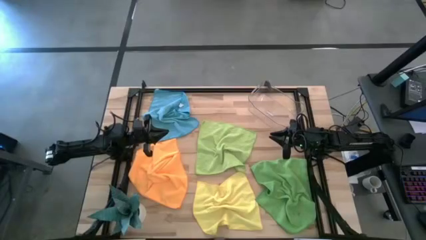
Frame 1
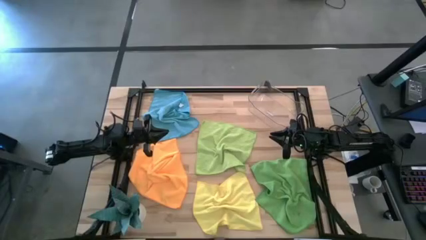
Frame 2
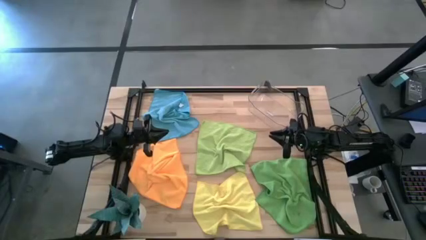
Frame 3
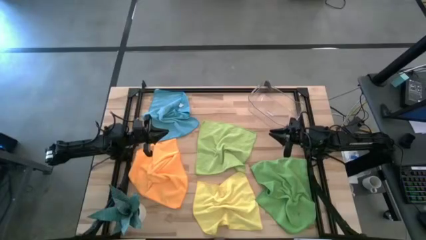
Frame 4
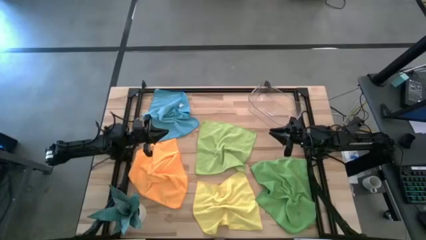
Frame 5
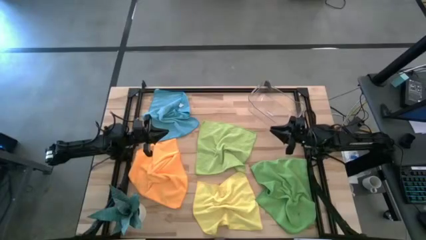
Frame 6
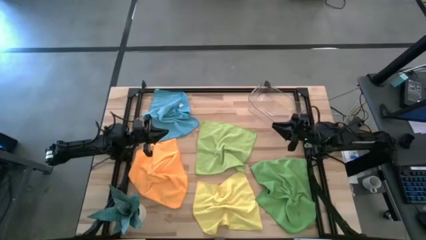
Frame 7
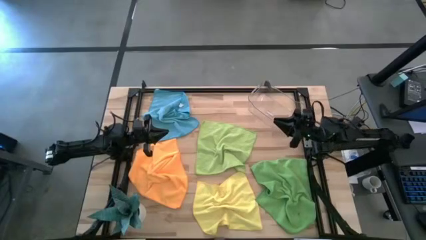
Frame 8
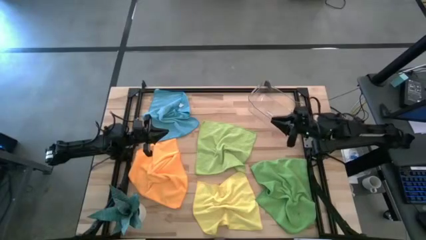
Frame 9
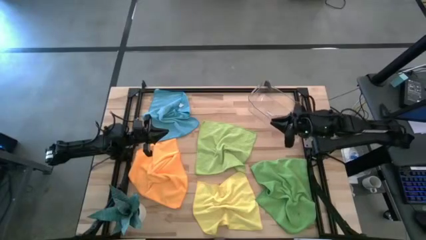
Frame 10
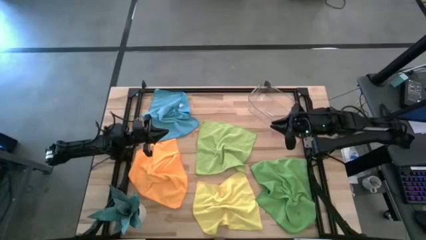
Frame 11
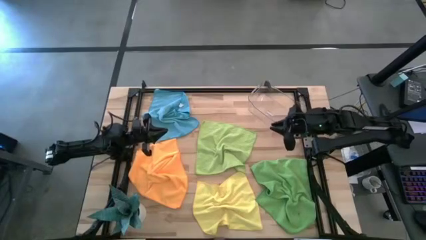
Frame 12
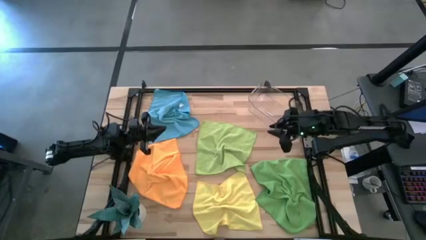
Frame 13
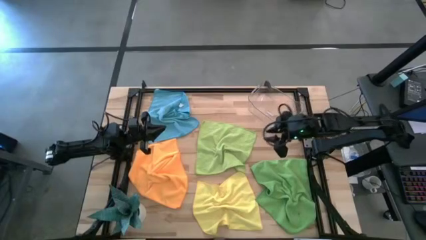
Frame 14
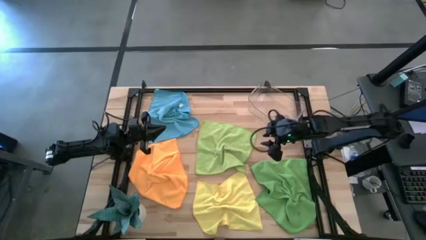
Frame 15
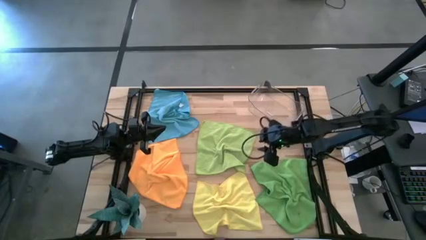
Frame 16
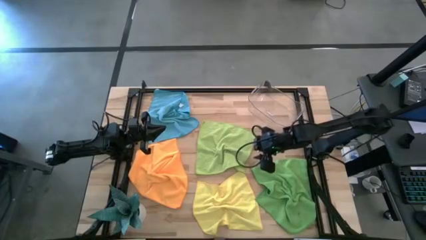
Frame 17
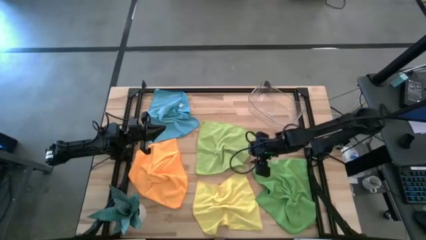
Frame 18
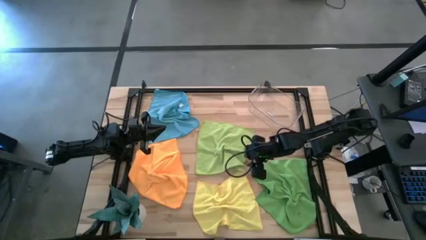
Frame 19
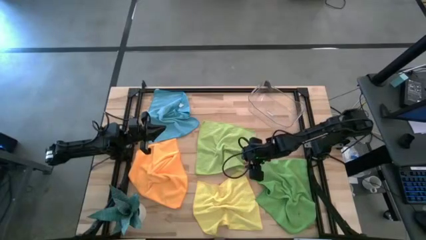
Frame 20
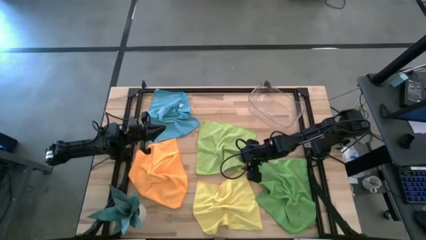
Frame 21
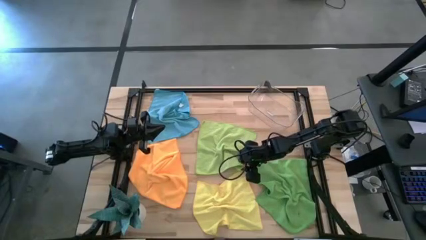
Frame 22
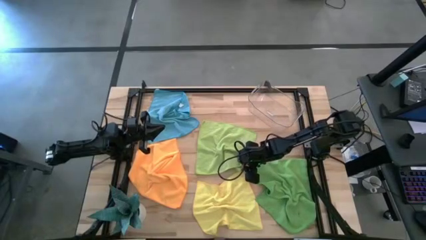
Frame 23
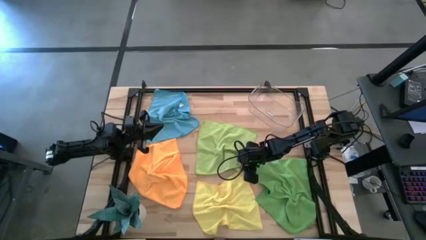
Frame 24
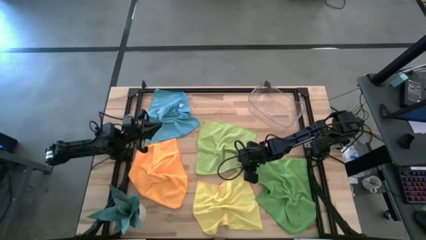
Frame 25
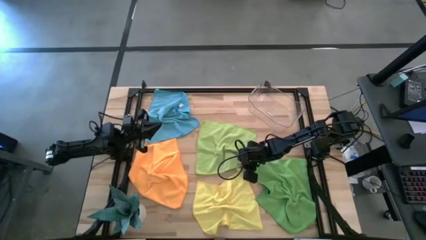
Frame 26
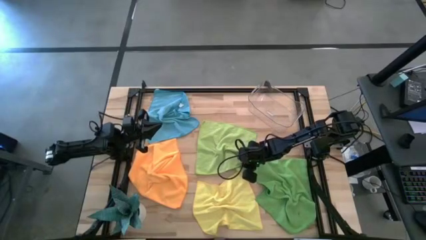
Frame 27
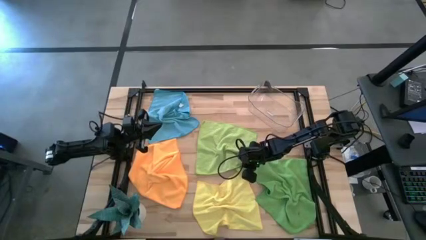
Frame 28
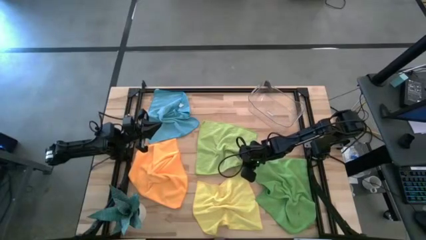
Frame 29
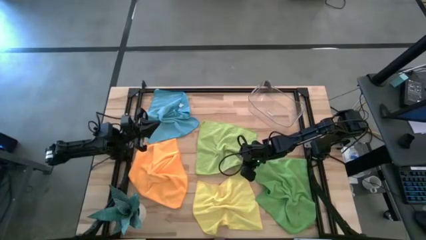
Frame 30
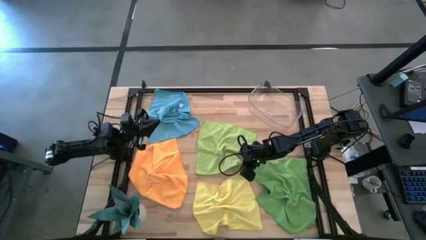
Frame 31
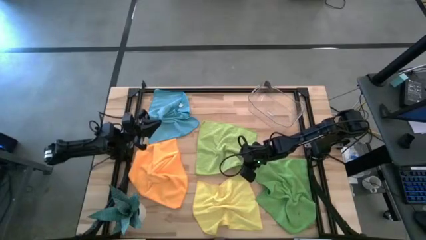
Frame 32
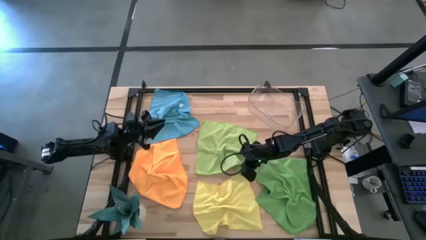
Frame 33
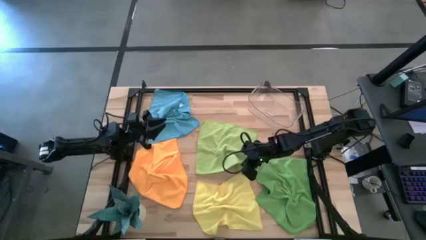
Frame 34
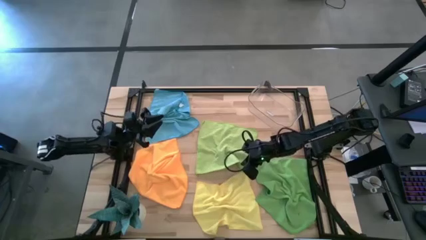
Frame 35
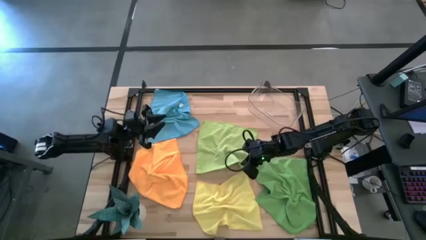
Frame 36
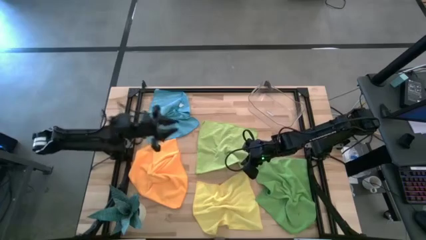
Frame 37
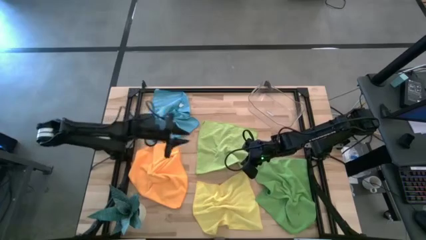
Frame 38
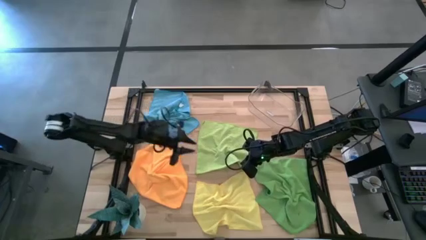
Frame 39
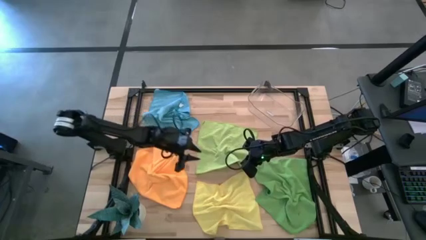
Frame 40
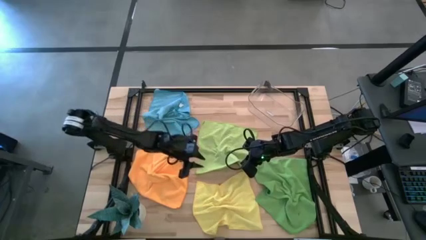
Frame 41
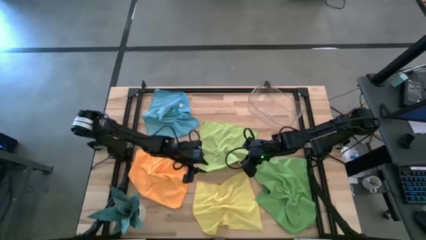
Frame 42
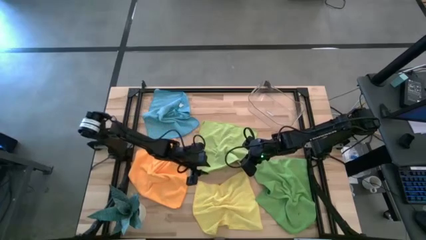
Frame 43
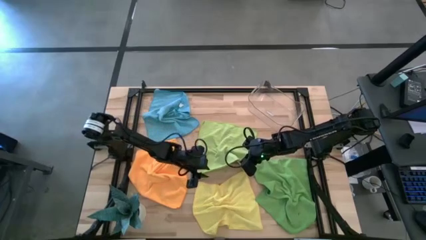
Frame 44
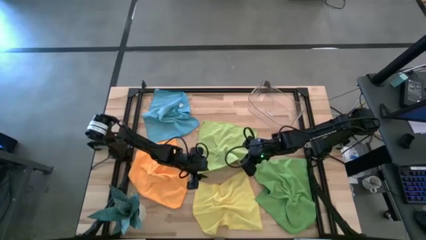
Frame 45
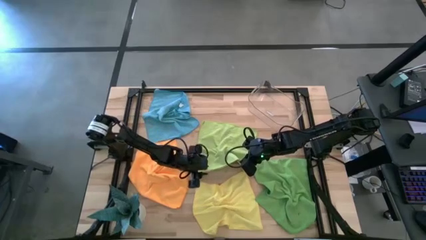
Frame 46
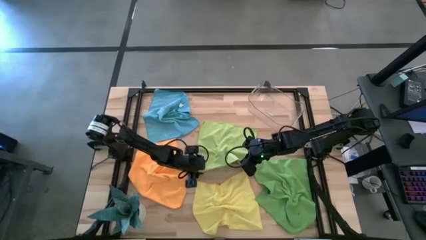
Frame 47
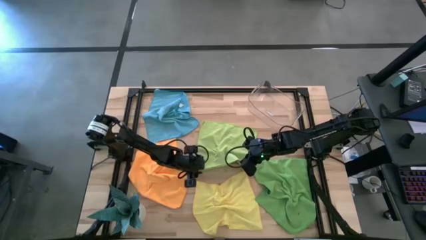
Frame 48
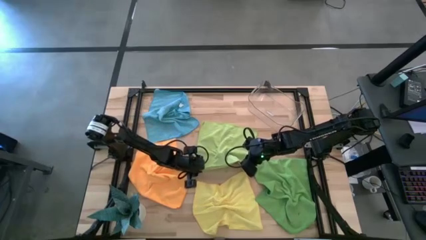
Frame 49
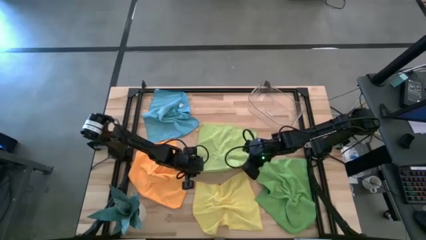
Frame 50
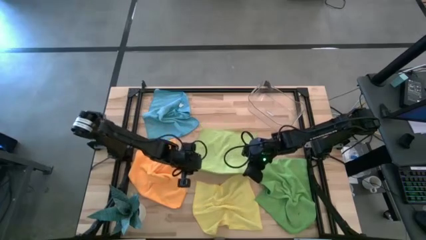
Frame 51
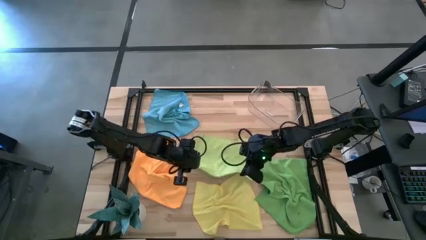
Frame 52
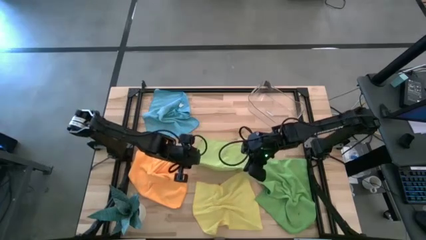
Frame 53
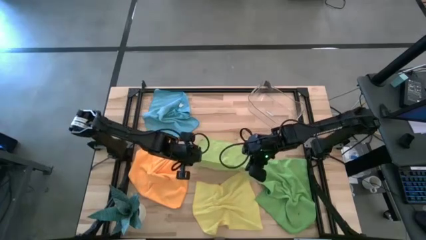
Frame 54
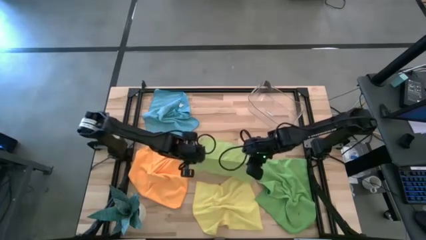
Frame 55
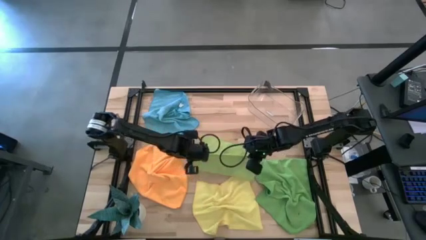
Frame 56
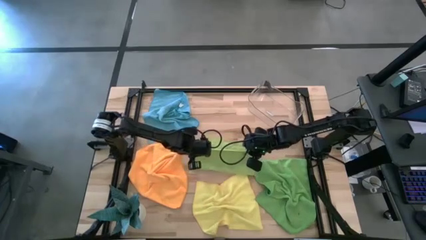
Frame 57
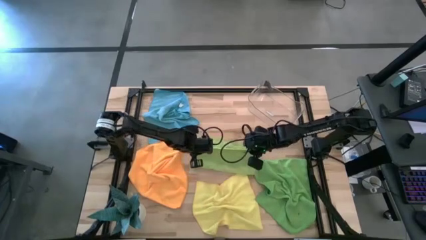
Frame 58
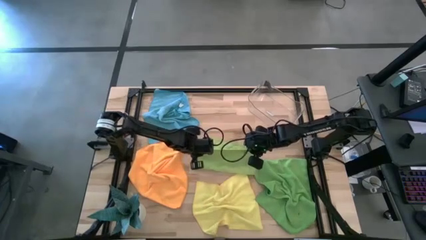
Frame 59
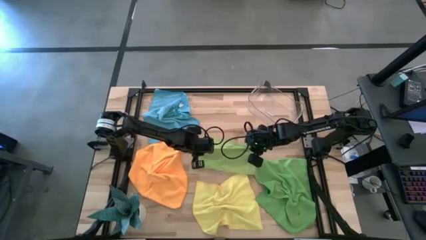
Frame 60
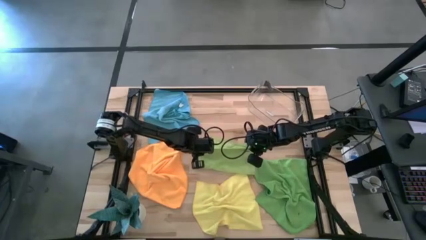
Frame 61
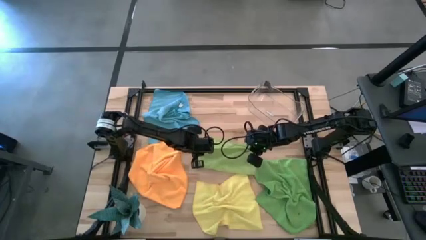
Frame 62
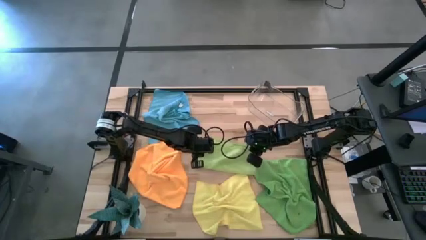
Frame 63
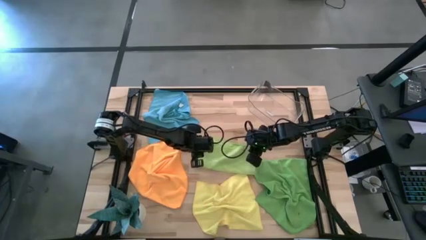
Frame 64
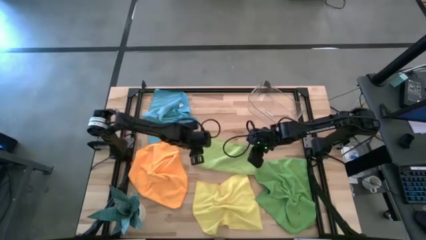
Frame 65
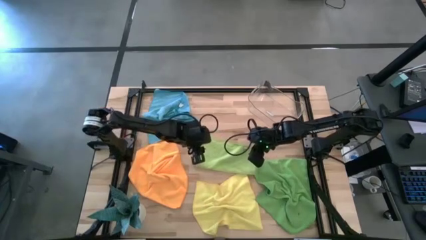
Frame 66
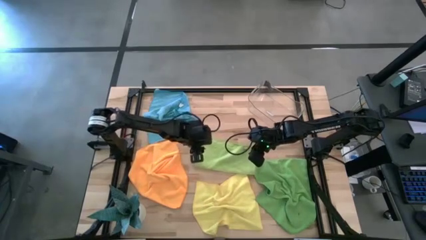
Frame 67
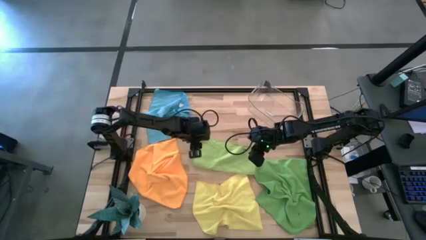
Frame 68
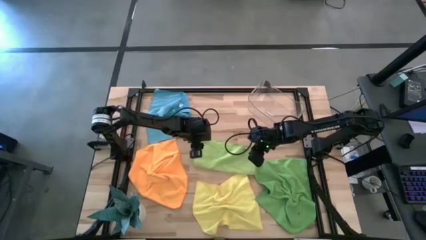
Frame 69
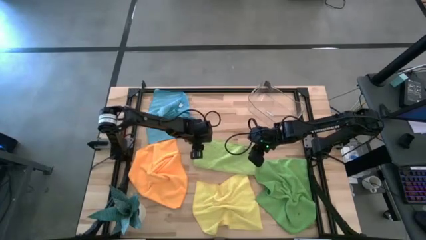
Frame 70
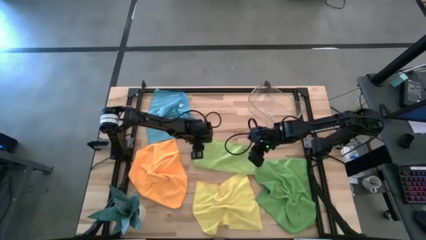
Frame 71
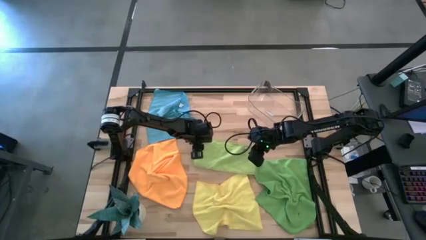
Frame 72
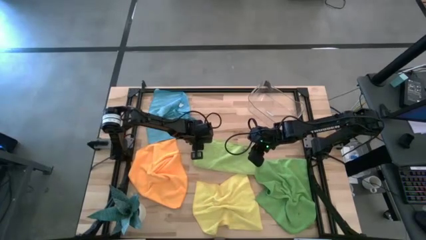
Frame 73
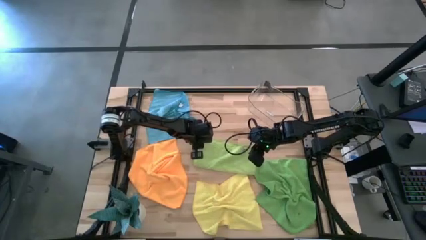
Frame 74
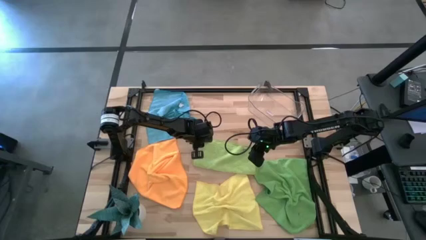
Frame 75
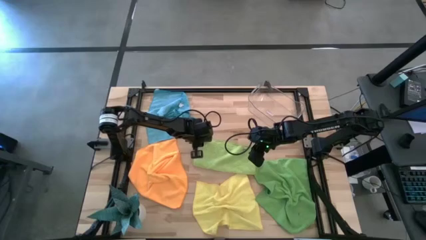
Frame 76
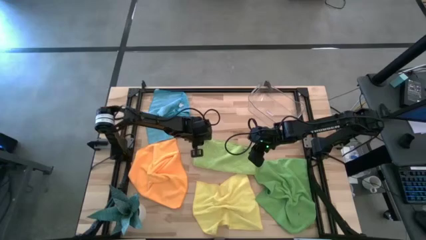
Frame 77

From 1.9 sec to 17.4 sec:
Task: Fold microfiber towels
Fold the light green microfiber cloth
